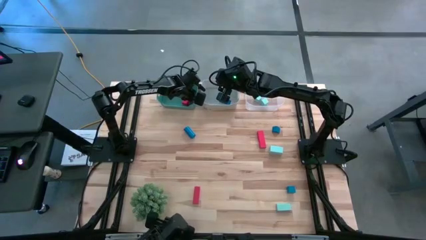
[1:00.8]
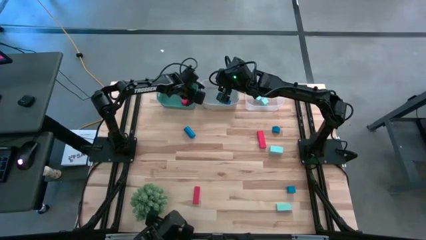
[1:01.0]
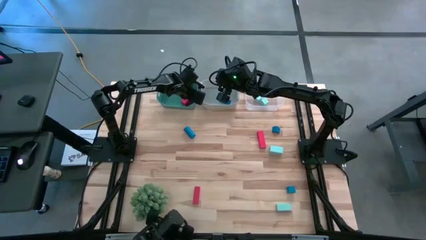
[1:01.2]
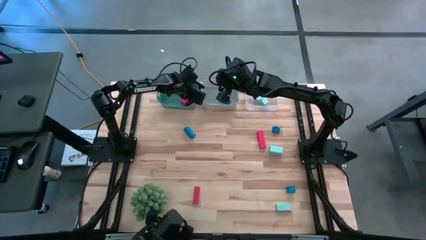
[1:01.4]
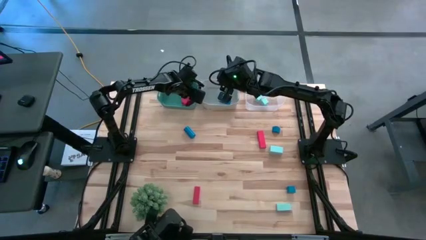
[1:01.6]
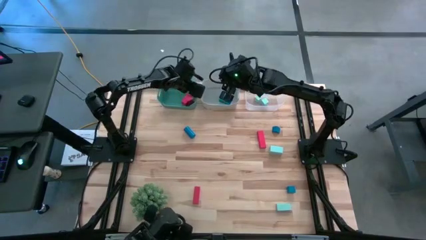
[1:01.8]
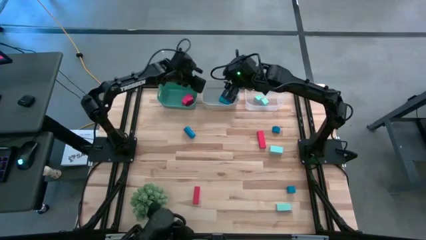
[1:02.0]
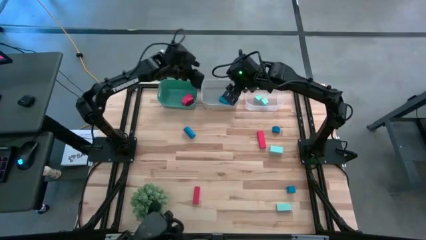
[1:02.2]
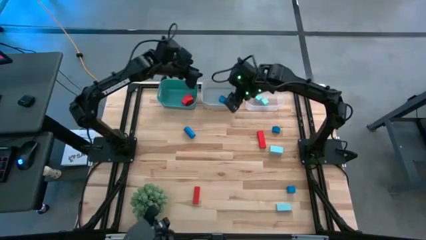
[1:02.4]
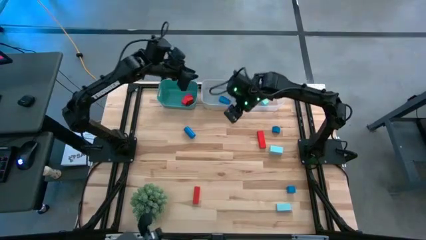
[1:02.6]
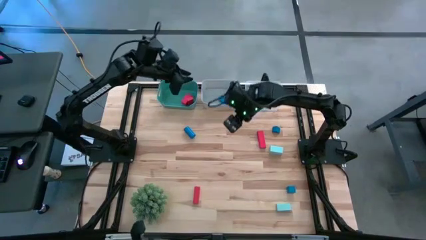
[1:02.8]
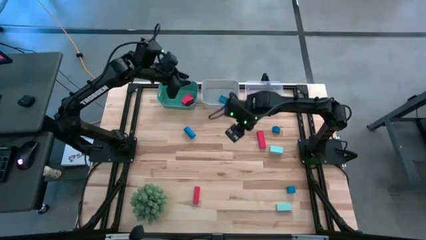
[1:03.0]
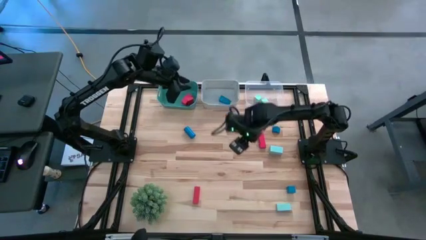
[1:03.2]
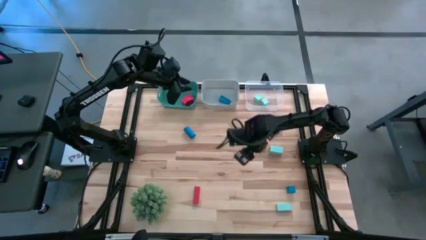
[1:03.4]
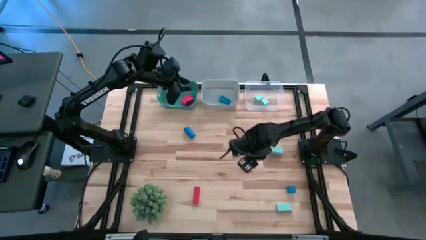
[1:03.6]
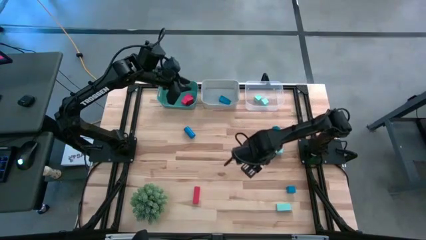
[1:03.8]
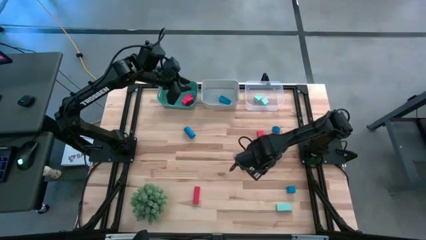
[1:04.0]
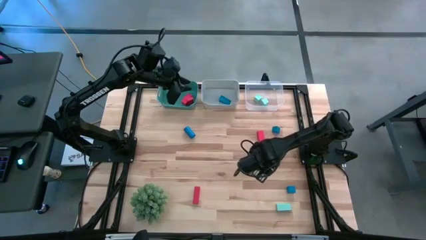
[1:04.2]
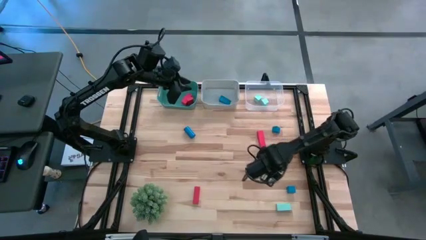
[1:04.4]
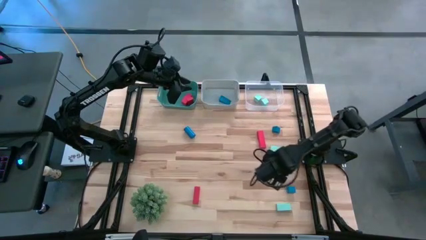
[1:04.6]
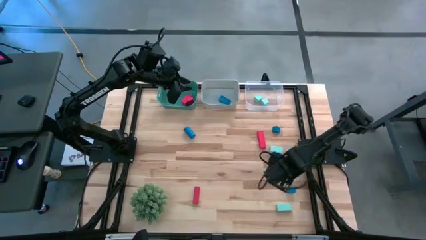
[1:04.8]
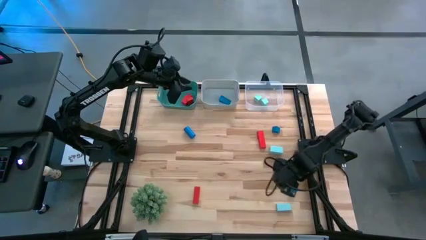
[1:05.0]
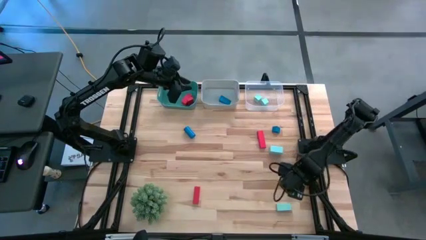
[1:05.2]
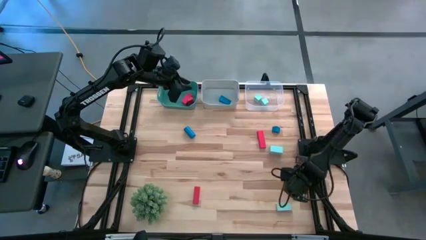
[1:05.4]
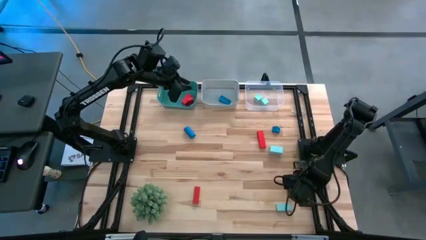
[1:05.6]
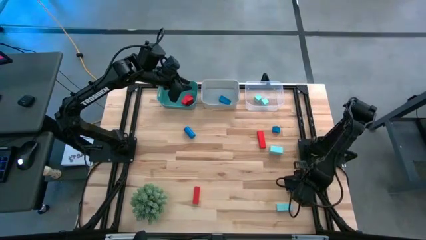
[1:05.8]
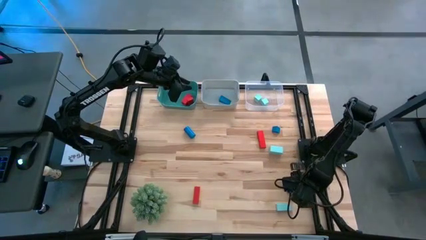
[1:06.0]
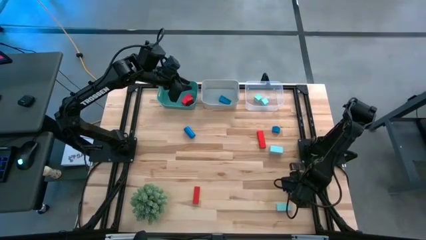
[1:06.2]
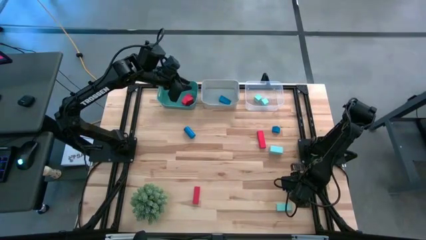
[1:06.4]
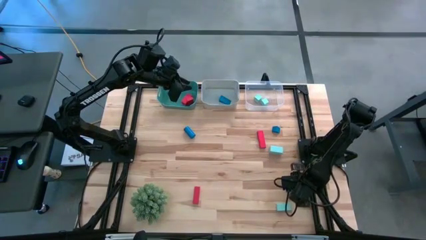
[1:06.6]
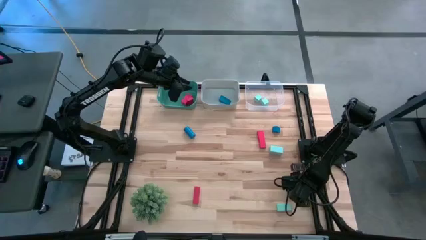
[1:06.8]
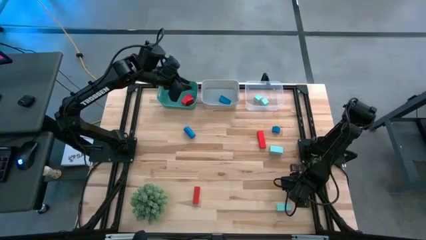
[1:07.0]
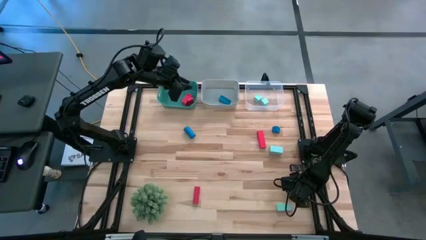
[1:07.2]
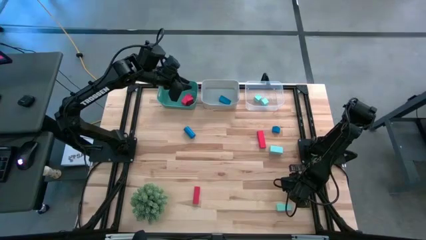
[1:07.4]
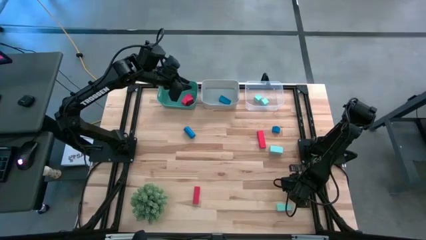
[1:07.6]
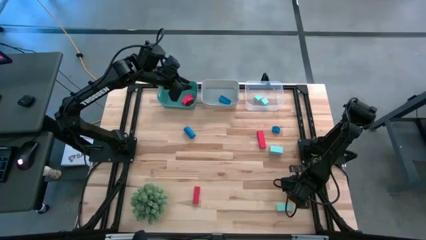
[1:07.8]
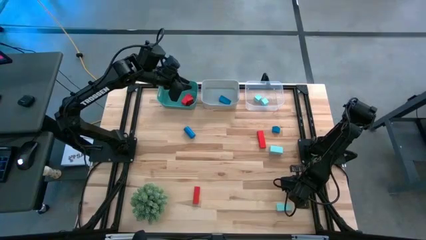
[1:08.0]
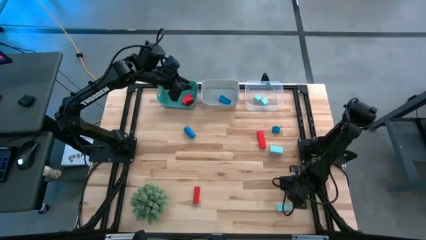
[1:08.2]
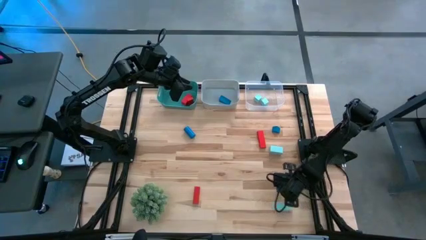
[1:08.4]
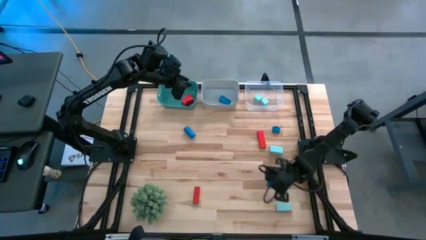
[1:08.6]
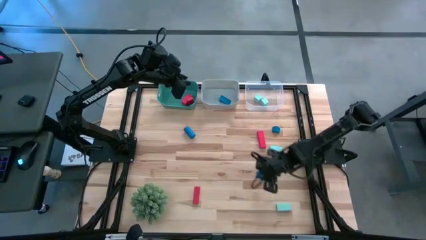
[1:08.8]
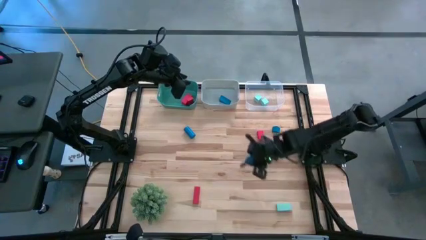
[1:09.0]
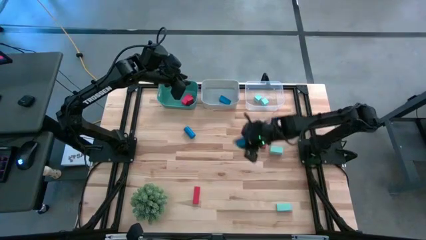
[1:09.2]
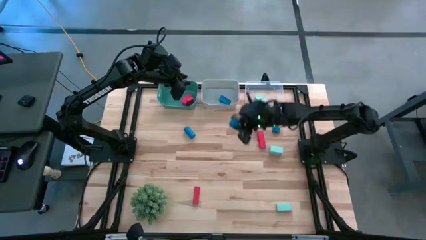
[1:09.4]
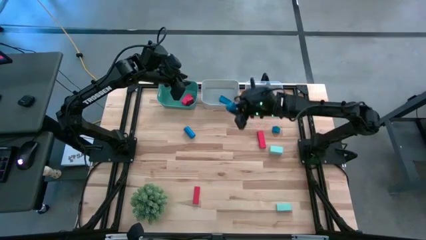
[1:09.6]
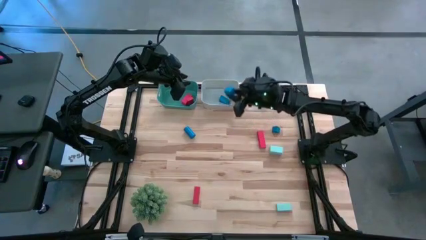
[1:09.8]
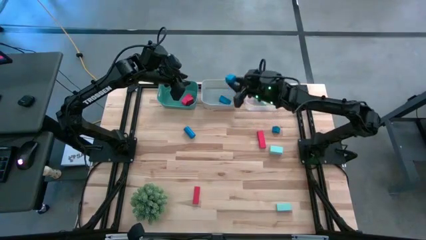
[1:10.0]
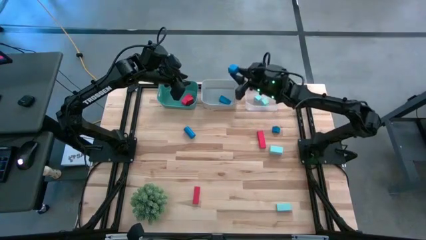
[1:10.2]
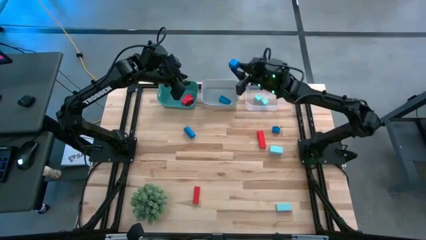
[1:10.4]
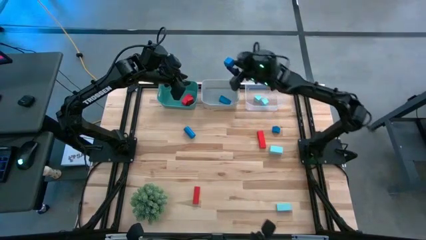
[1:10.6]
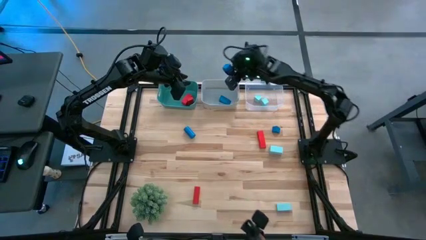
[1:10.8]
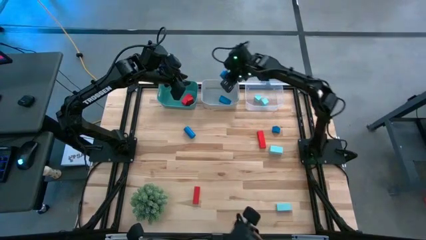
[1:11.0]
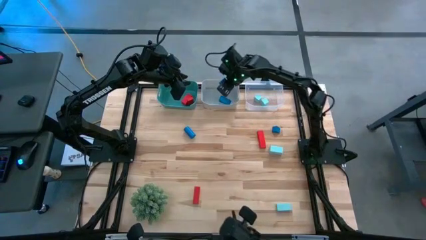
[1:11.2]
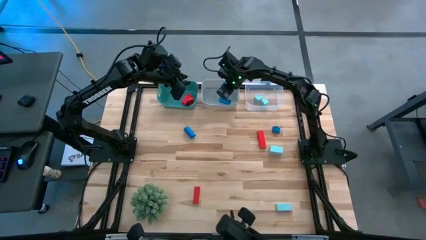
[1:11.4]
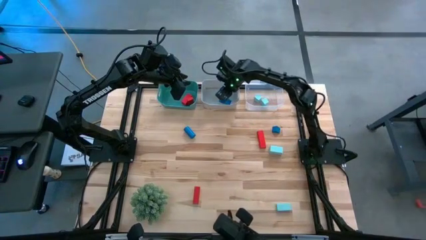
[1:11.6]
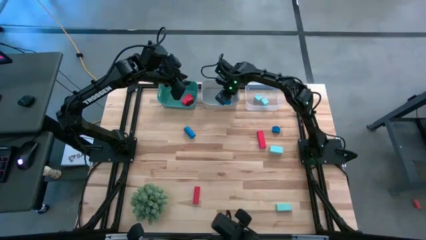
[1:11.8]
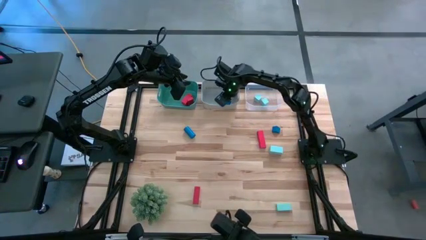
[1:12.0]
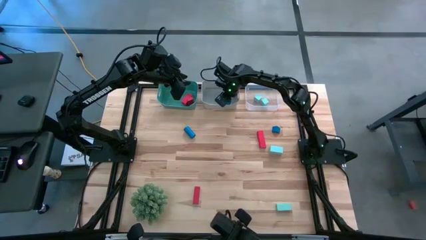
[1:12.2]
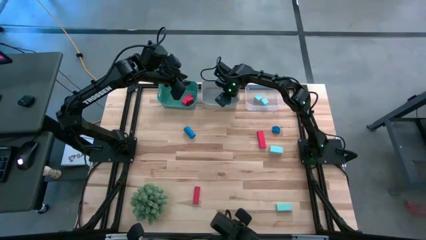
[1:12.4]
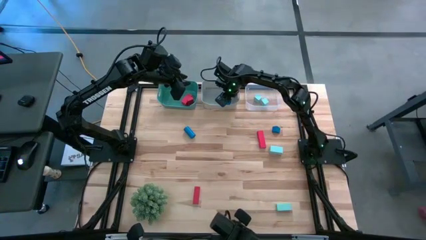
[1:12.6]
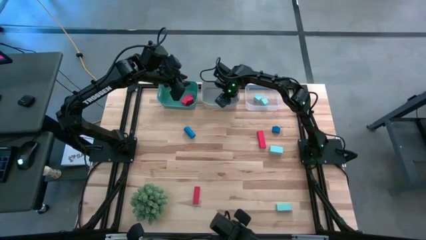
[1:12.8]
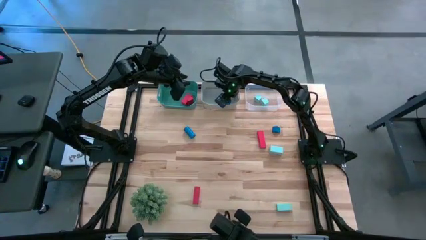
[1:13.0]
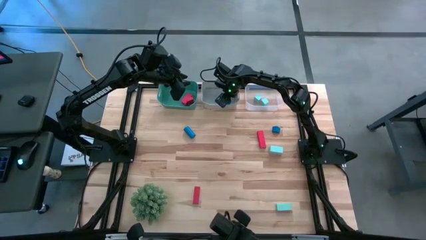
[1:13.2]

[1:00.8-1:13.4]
Task: Sort & place blocks by color
Put the blue block into the gray bin

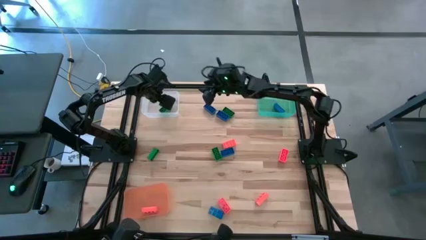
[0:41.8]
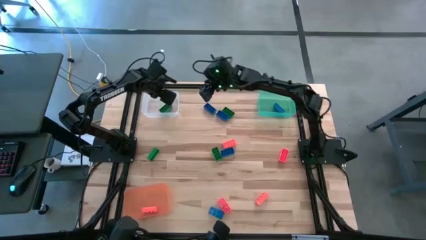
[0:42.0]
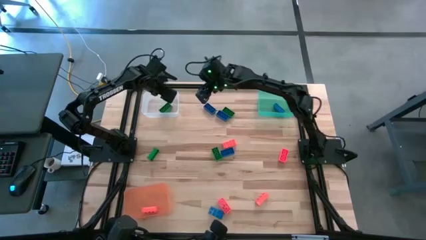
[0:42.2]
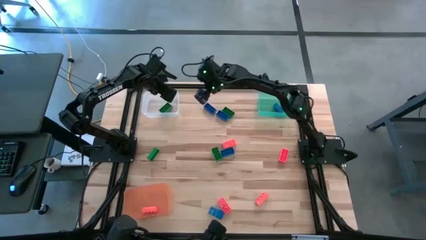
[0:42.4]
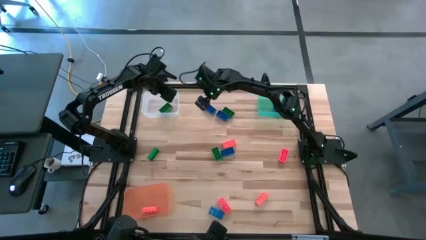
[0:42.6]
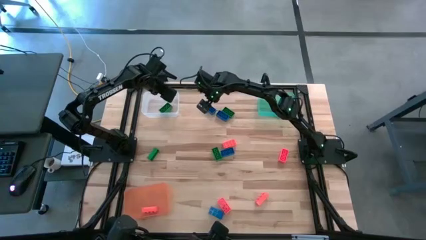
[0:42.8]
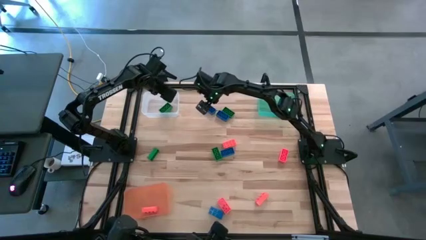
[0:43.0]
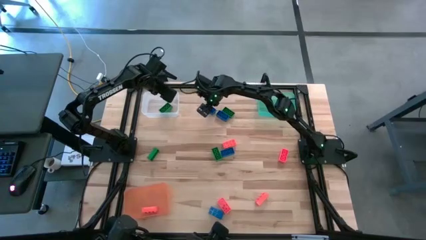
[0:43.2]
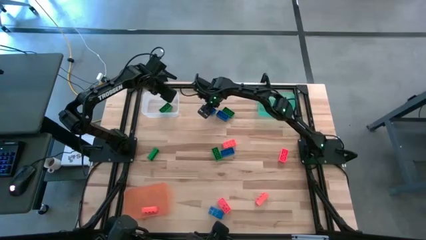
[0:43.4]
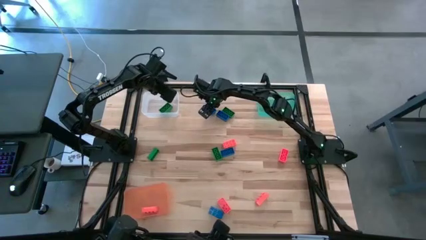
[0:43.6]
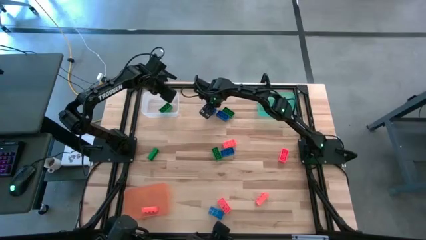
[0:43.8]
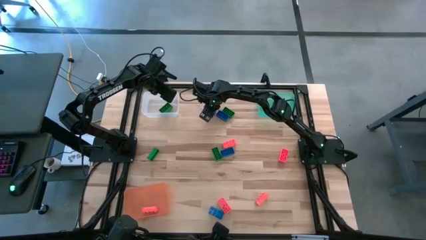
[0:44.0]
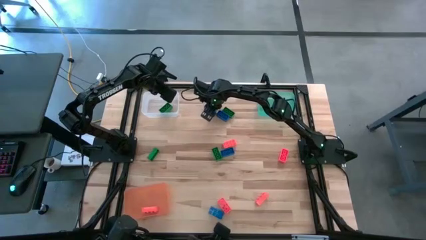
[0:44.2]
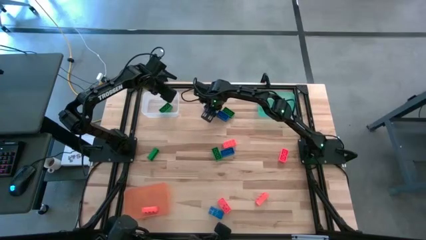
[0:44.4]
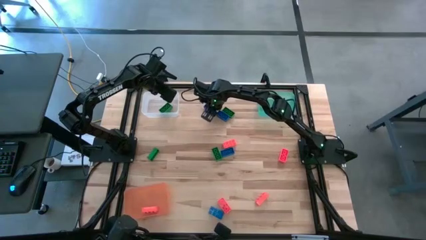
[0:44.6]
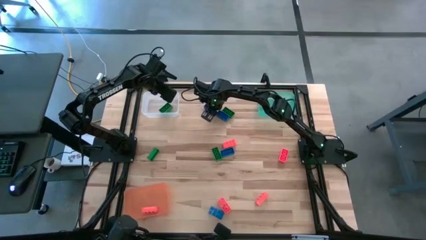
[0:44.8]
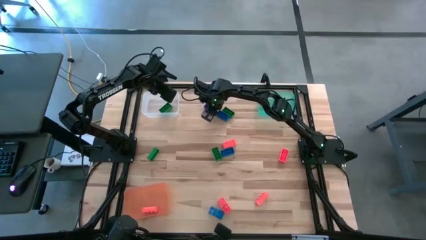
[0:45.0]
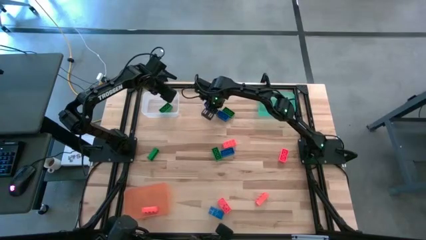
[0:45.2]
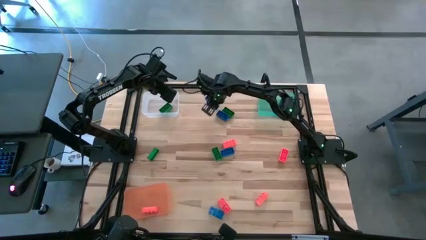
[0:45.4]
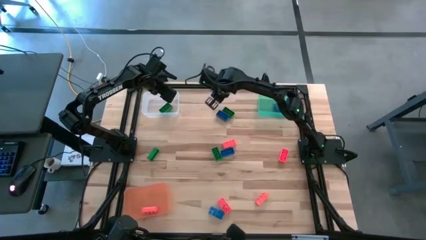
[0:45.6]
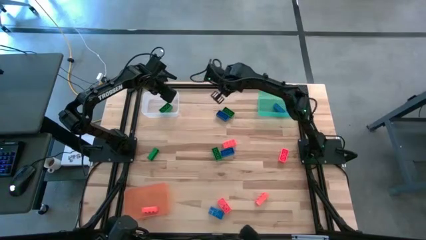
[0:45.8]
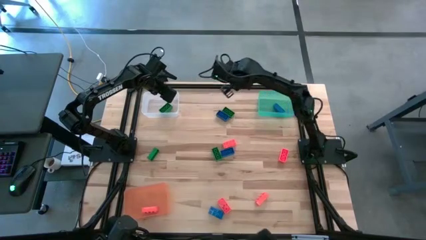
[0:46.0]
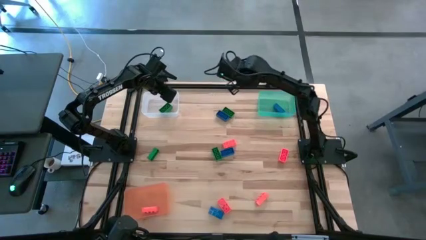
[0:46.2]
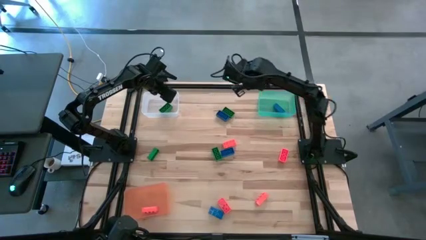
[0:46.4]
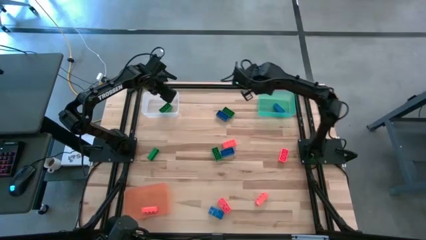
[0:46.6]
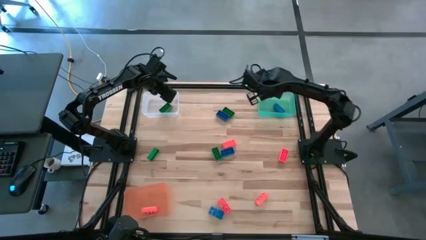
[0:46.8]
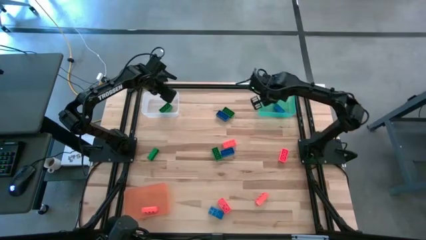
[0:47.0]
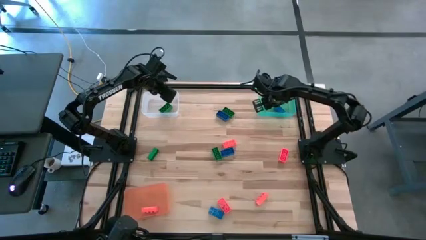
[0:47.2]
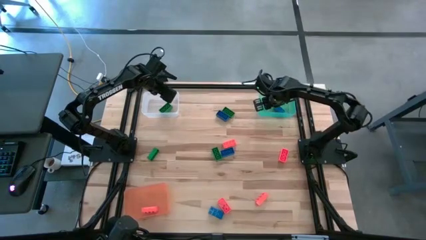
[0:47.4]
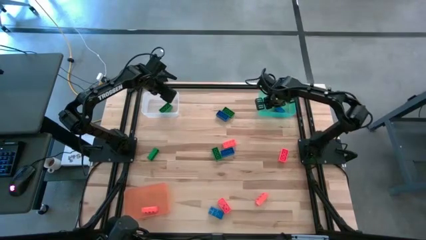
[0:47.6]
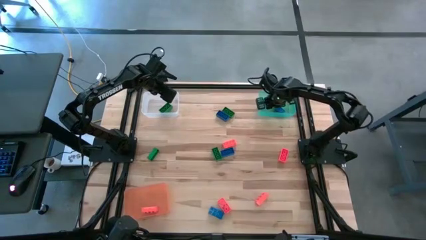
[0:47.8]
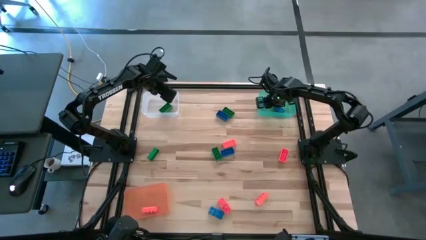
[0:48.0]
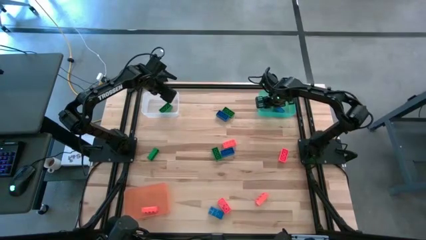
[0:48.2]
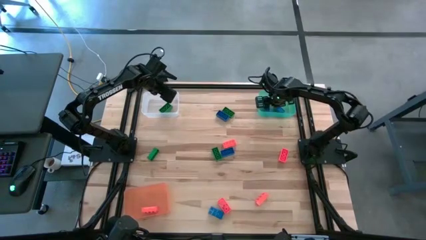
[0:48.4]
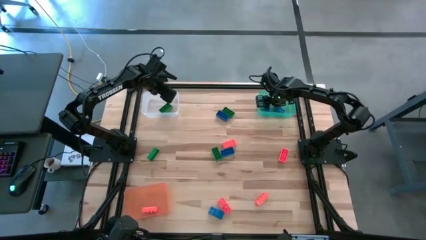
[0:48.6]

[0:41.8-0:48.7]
Task: Sort & place blocks by color
Put the blue block into the green bin
